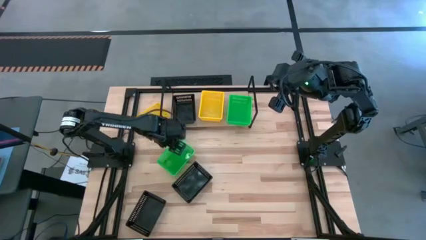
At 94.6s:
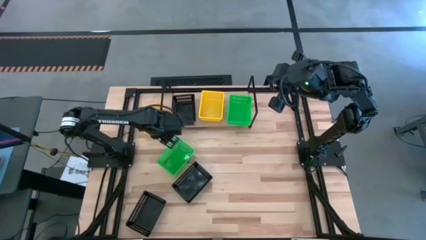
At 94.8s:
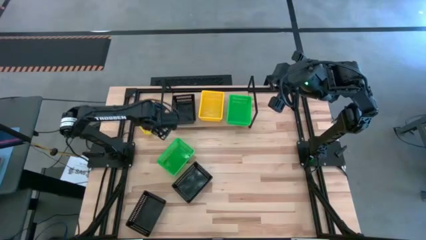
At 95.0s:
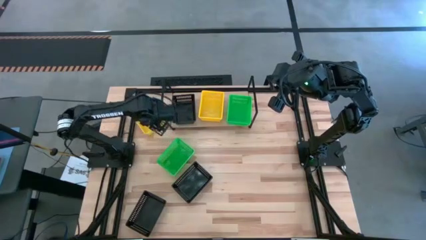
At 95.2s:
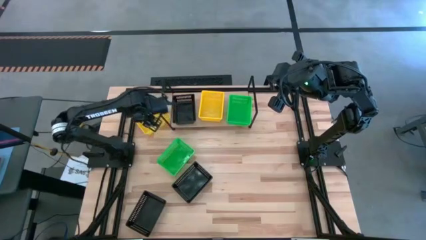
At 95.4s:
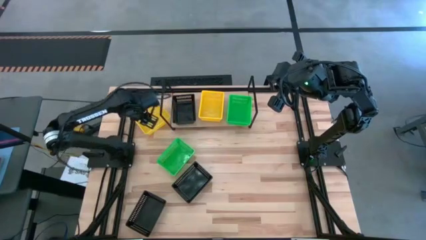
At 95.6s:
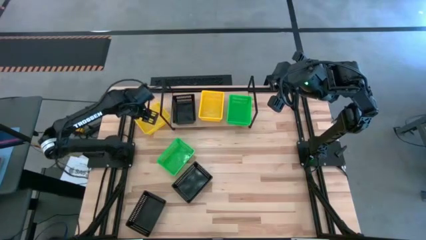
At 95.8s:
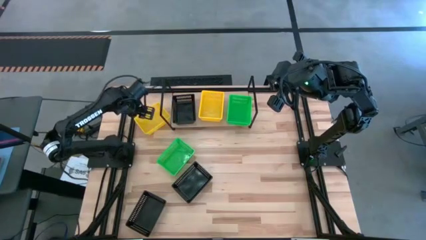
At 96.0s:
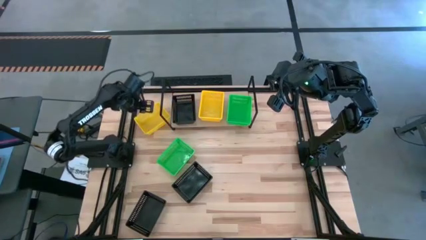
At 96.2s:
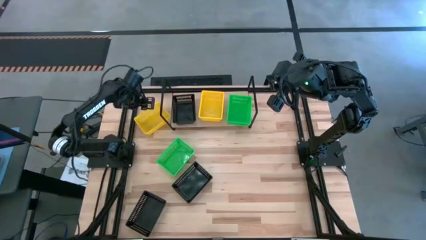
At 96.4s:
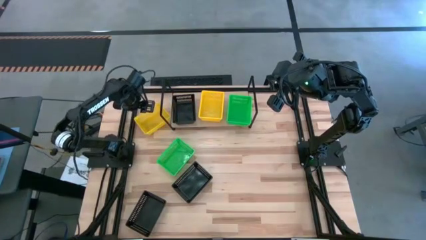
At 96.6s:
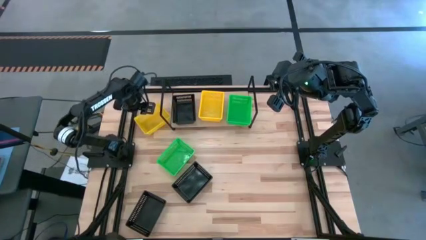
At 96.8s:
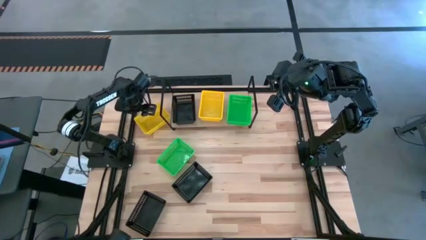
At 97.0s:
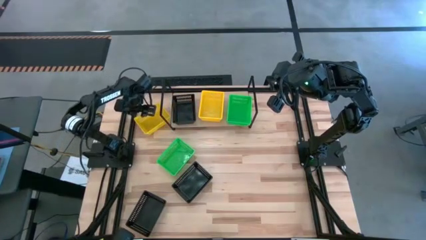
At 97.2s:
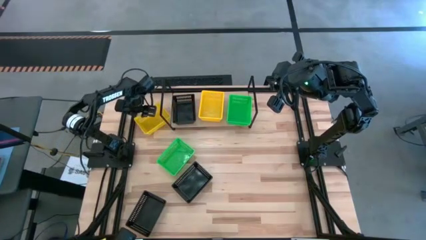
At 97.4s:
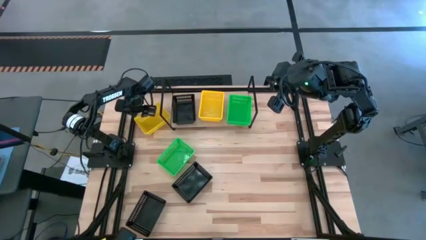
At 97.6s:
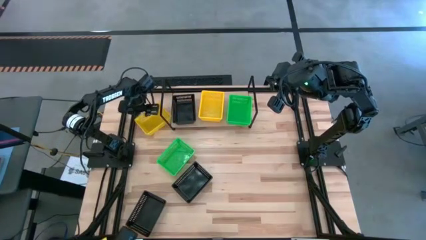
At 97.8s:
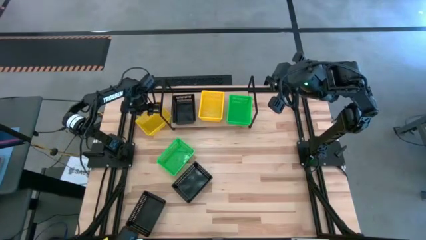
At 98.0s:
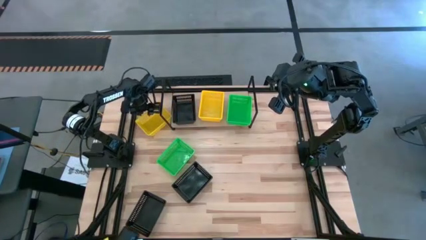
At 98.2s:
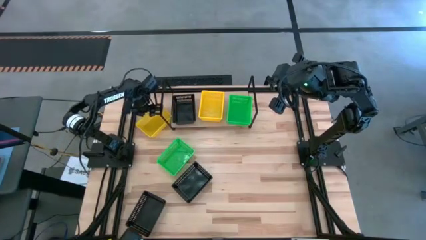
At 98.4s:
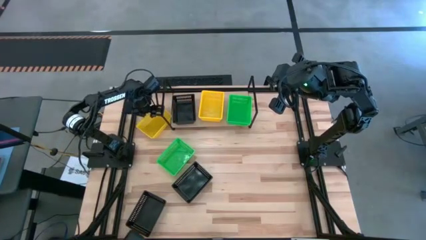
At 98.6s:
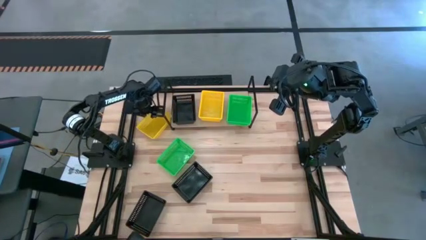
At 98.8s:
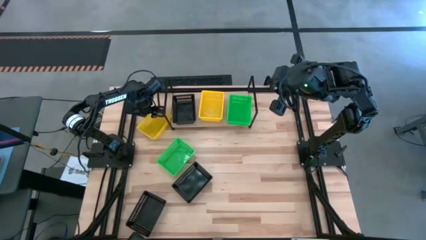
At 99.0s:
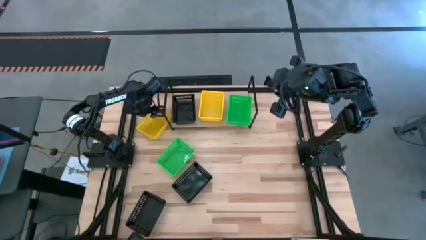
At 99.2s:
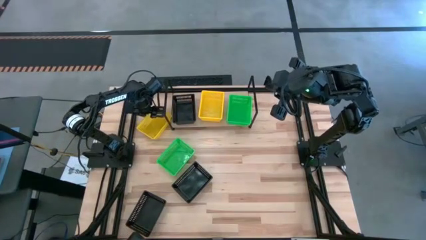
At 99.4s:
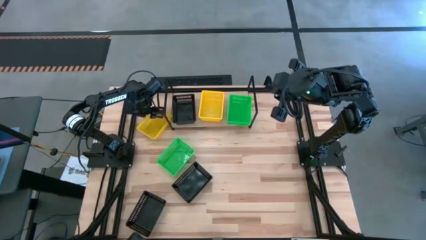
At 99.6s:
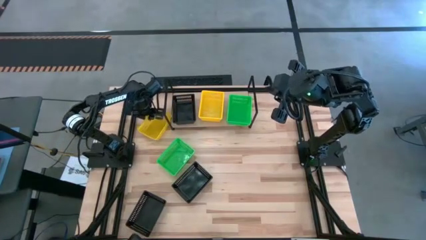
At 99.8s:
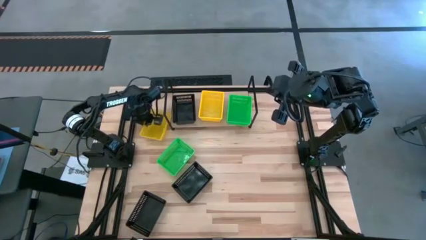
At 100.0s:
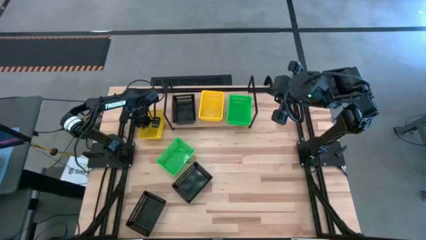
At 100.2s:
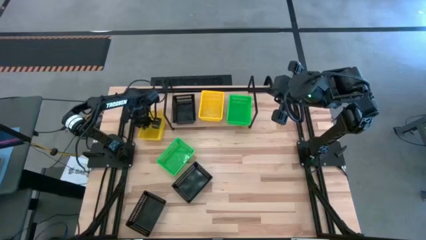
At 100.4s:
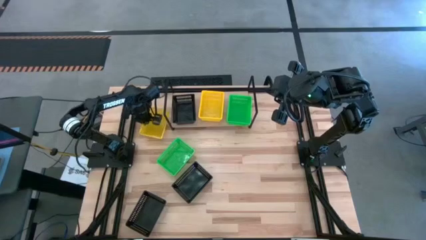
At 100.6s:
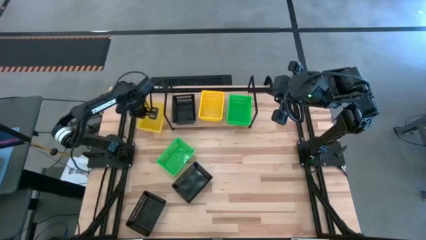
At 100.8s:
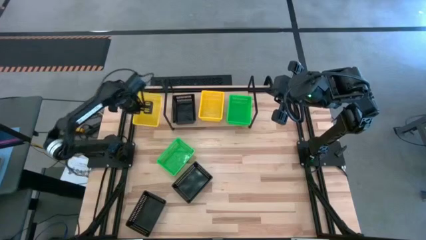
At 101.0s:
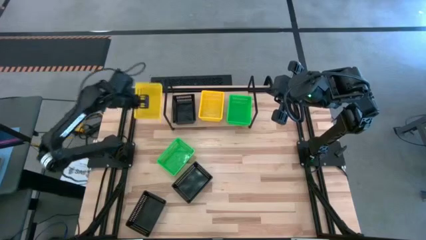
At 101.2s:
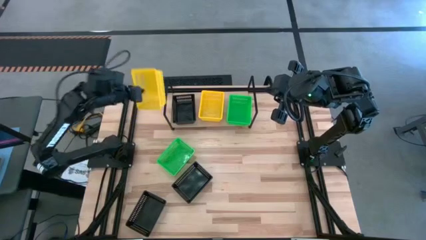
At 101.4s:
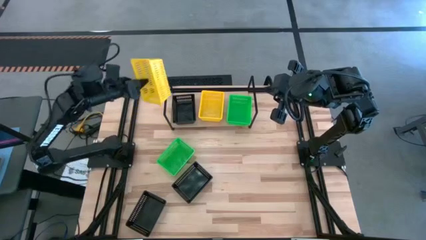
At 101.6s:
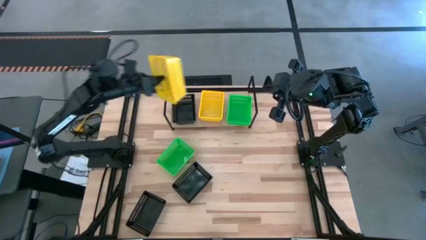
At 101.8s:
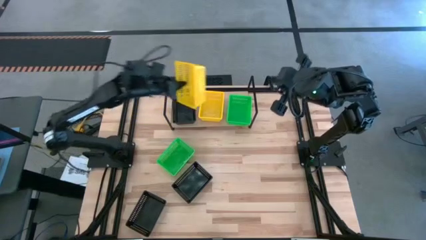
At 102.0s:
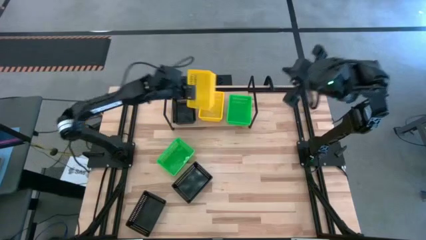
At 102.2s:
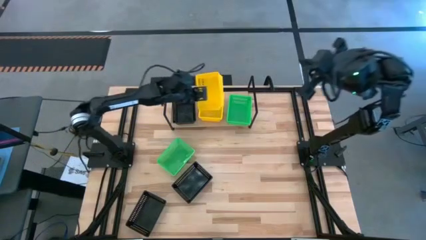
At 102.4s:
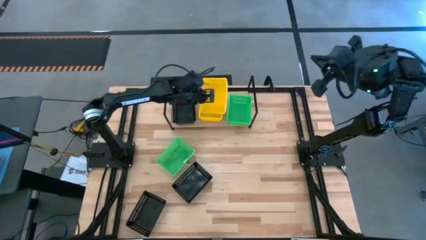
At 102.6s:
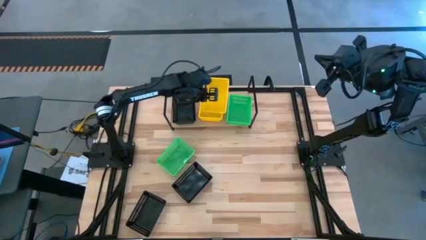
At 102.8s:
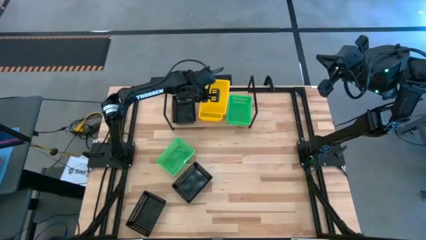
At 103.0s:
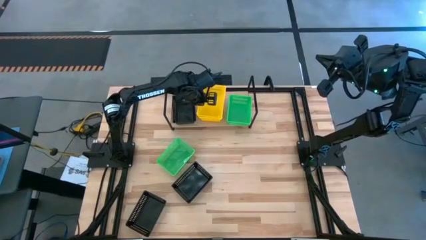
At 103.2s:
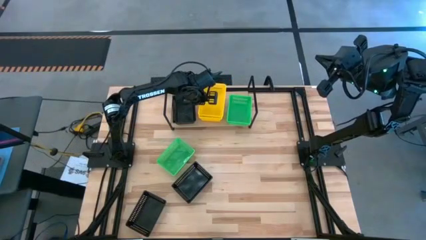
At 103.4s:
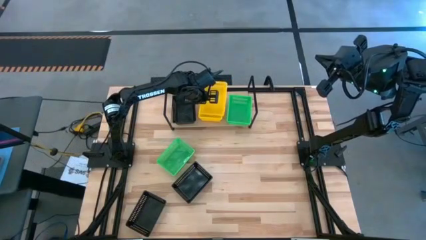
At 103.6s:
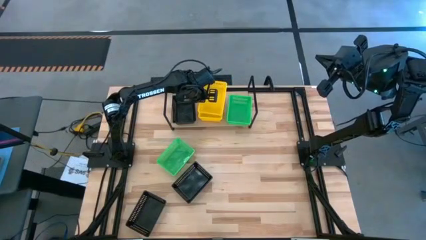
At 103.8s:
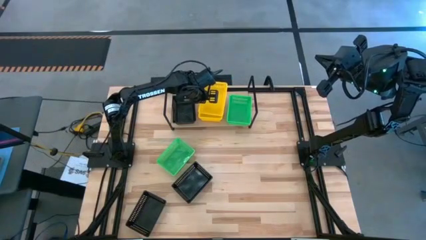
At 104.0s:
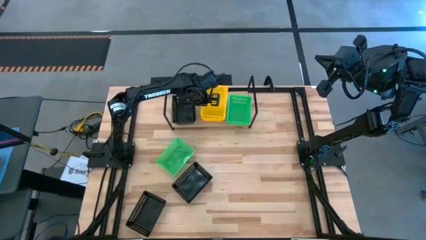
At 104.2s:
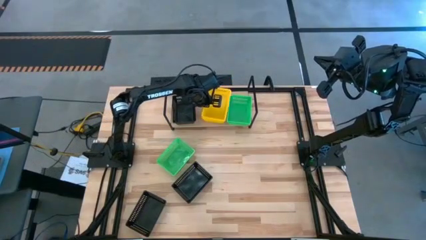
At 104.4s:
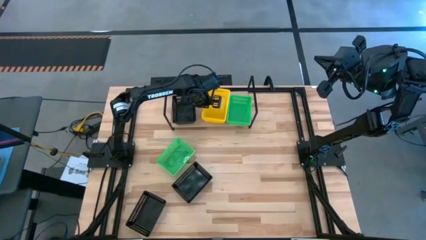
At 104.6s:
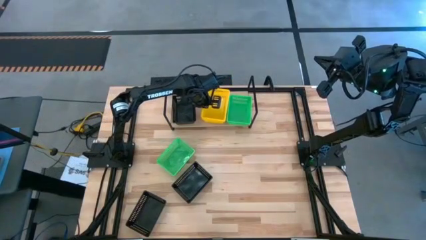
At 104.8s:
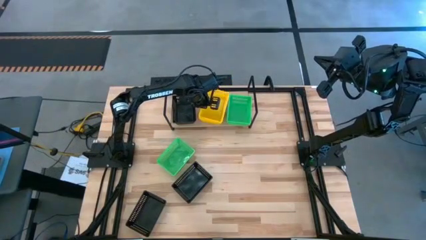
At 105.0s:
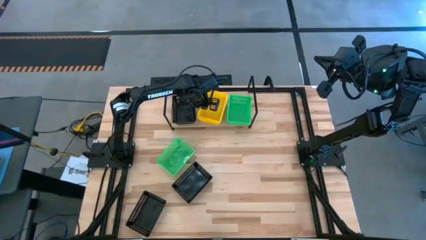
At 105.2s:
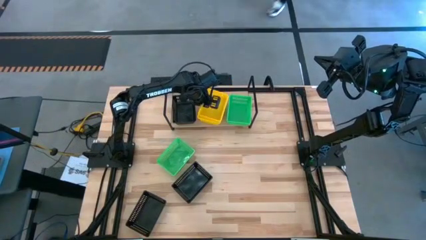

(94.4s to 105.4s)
Task: Stack baskets on shelf by color
Stack the yellow bin on top of the yellow bin on the shelf

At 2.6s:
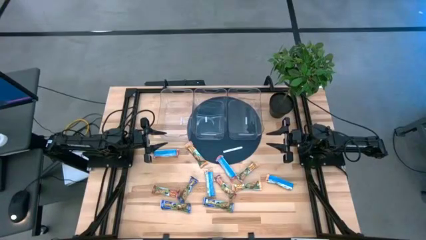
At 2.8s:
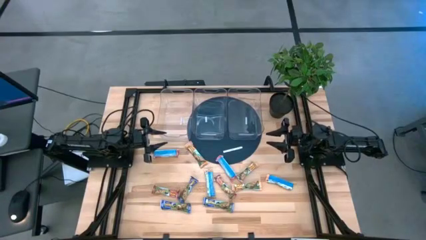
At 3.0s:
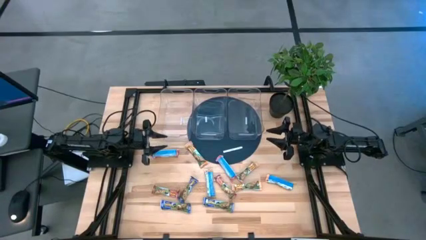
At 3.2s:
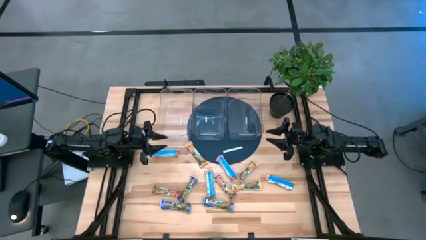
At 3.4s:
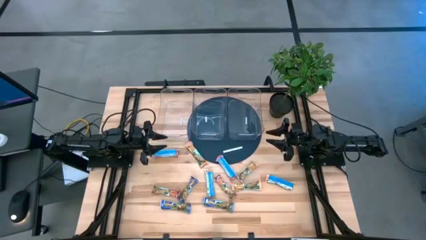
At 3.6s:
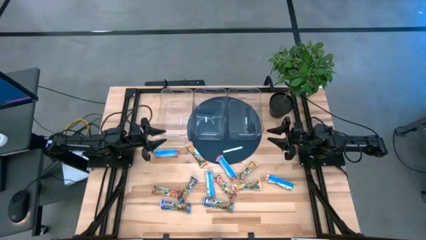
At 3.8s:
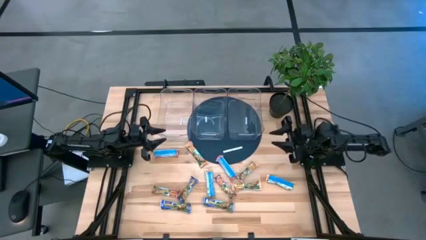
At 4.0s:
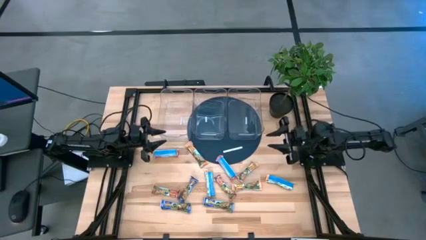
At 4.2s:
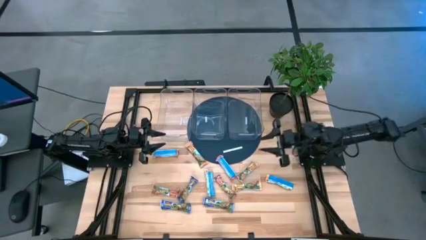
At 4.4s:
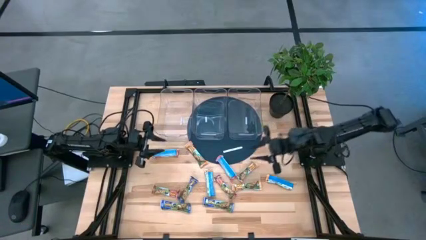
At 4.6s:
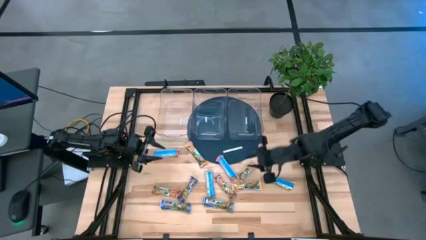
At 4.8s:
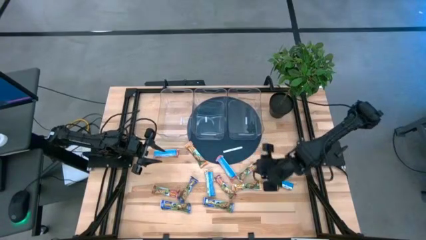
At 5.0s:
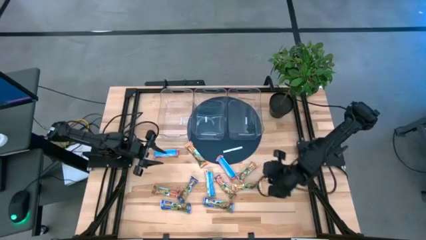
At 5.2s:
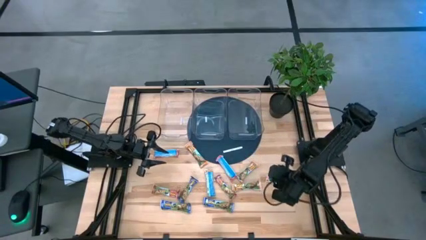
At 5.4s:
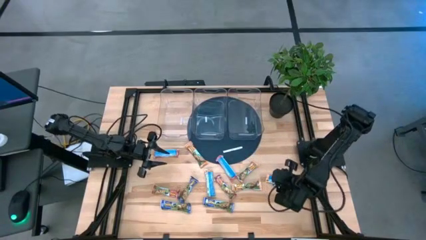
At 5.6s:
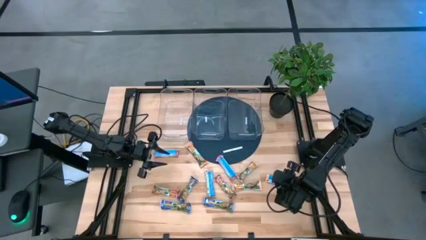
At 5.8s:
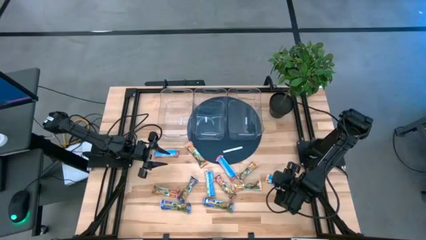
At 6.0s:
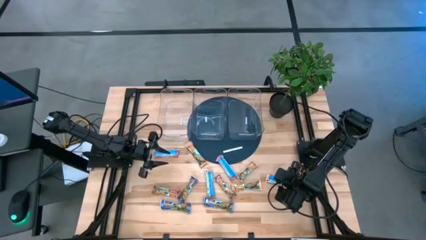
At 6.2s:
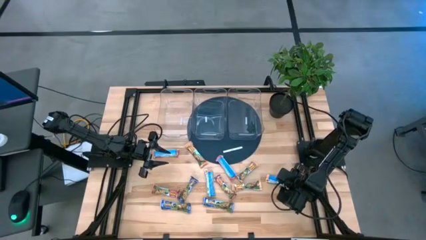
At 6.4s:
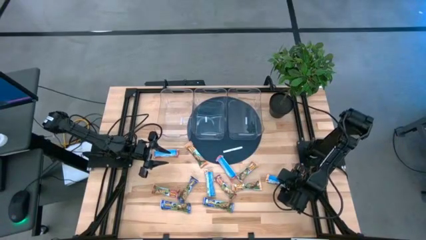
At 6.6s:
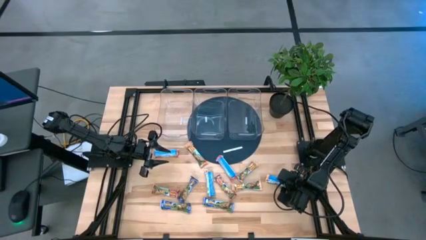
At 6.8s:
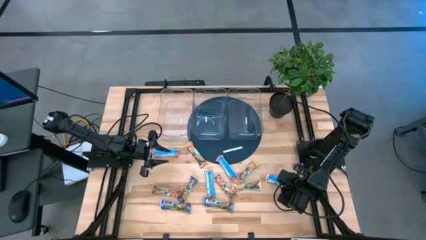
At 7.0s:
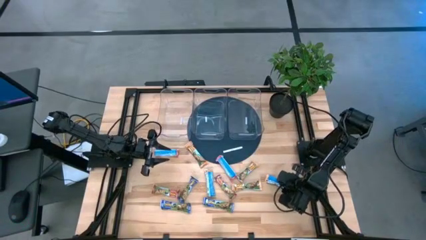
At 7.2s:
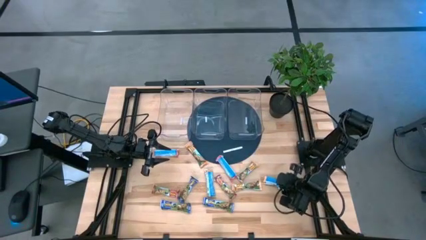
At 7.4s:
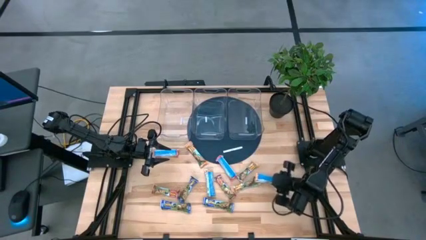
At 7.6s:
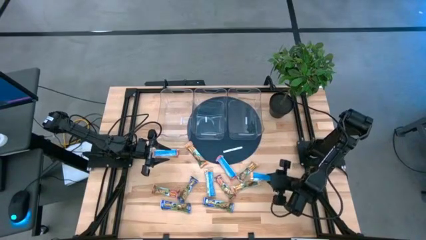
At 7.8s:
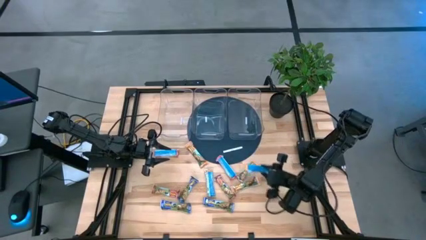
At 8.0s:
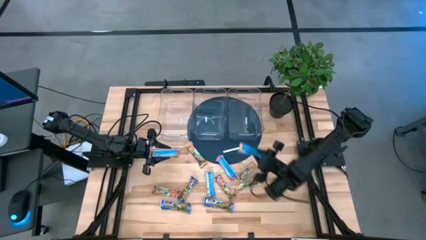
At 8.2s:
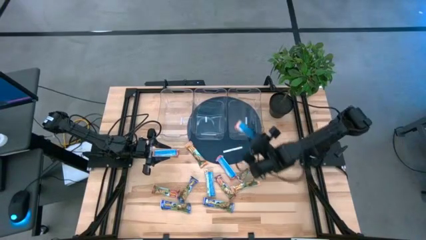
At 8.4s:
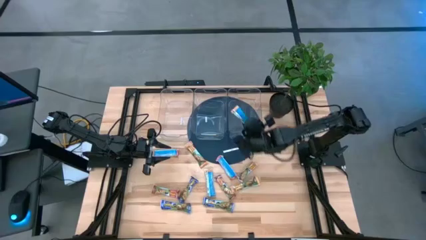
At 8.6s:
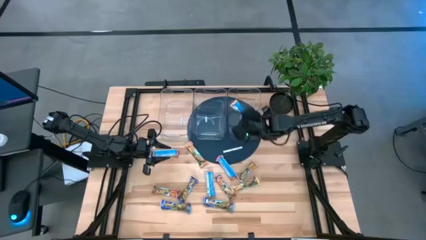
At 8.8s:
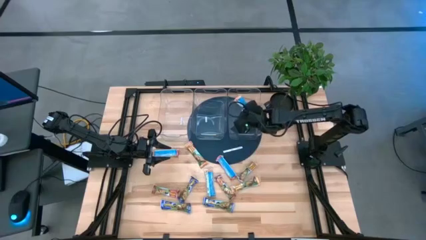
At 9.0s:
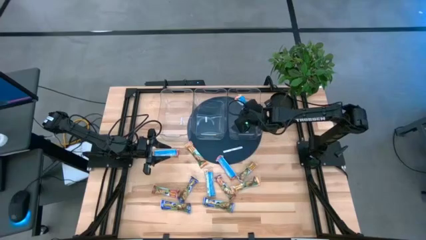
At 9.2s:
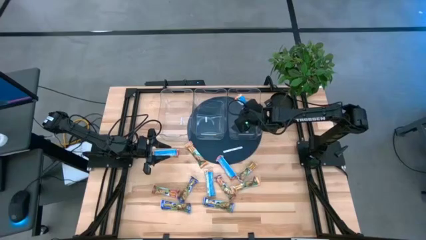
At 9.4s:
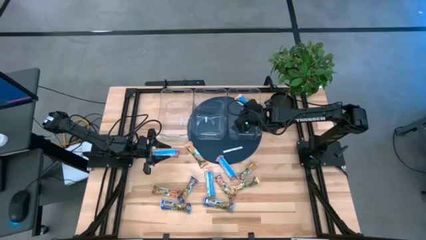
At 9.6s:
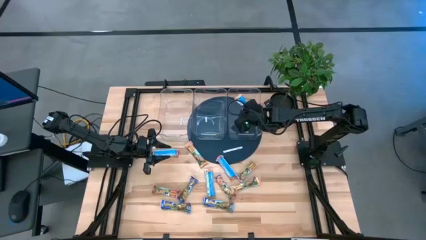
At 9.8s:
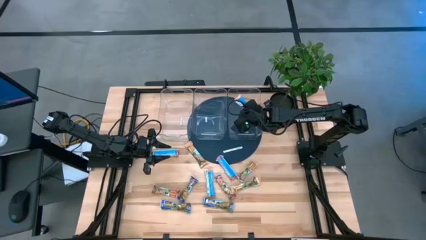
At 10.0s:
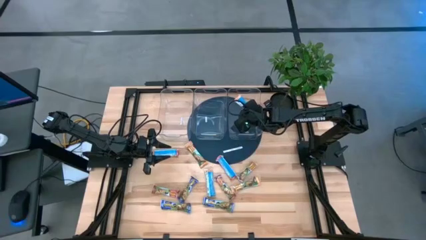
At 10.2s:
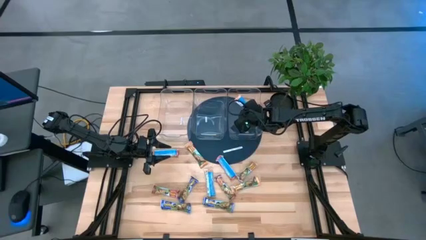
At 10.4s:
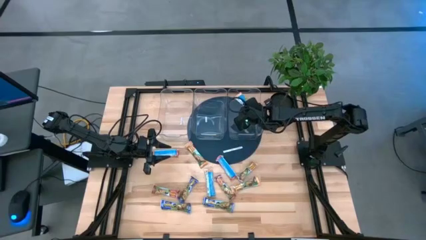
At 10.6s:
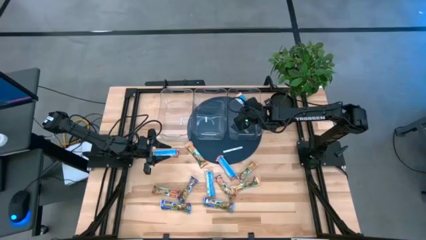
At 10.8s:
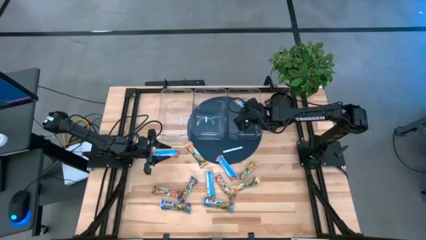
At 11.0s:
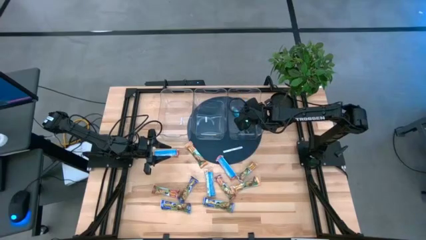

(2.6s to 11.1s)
Task: Pick and place Granola Bars by type
Put the orange granola bar into the right transparent bin
